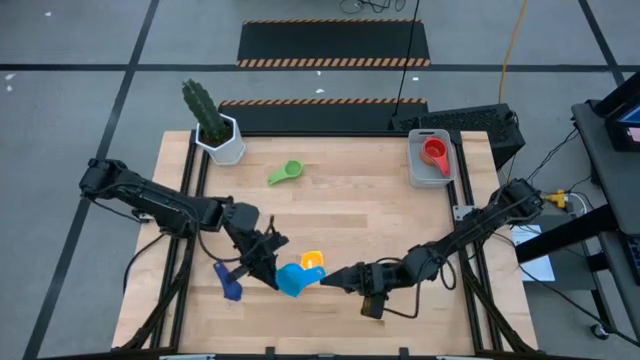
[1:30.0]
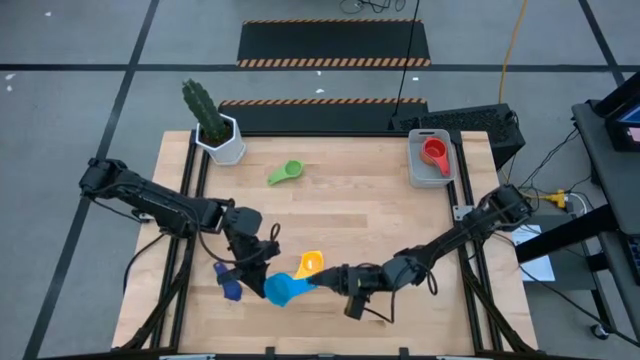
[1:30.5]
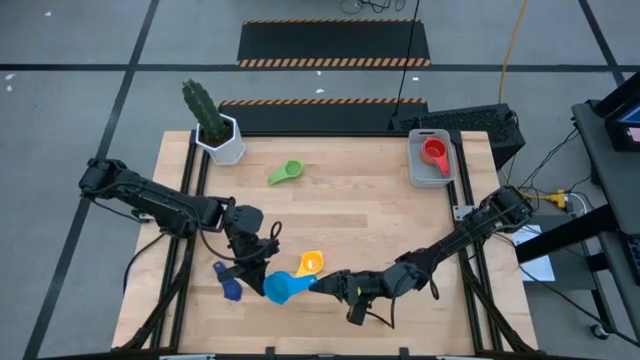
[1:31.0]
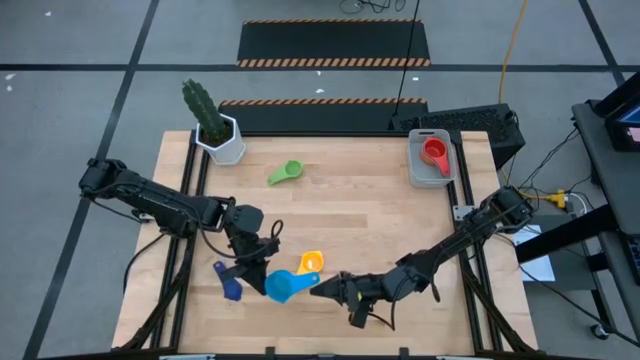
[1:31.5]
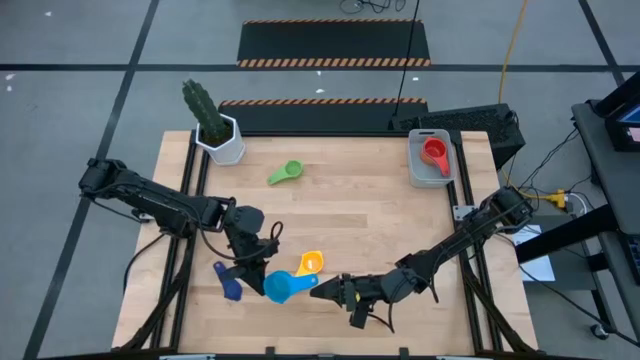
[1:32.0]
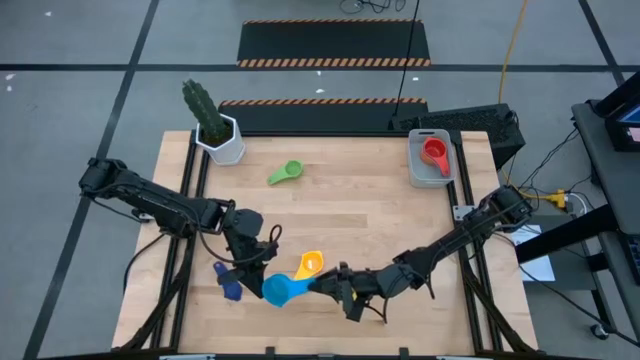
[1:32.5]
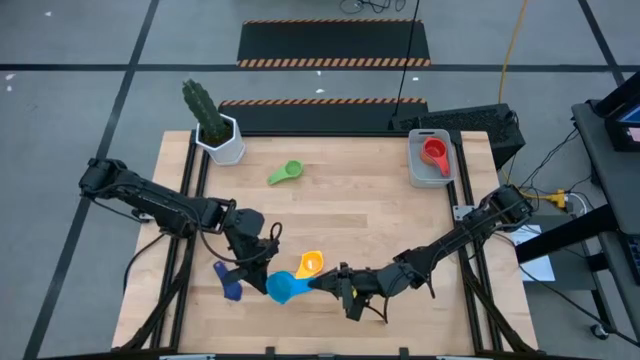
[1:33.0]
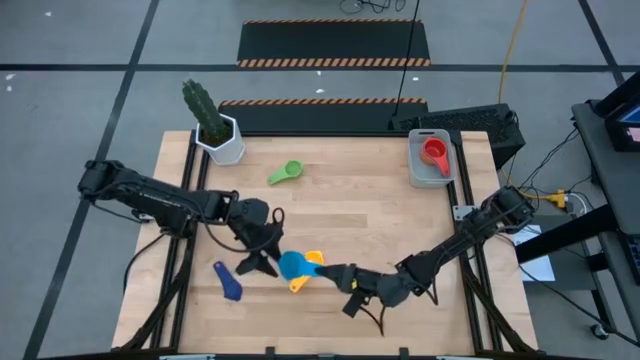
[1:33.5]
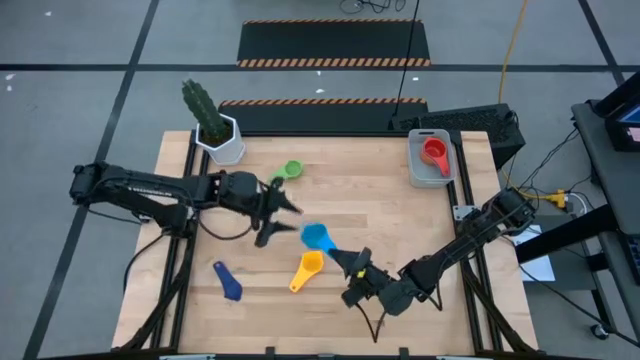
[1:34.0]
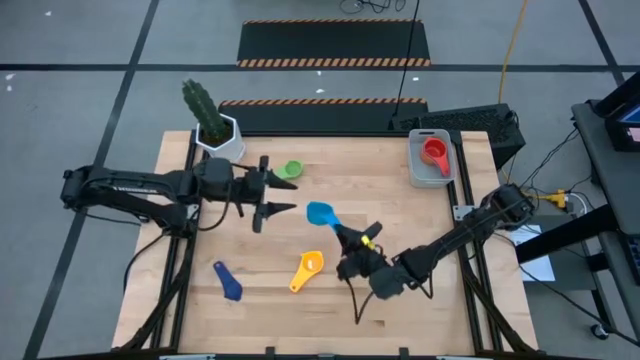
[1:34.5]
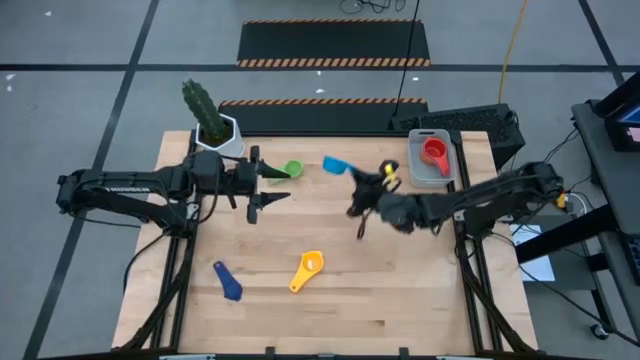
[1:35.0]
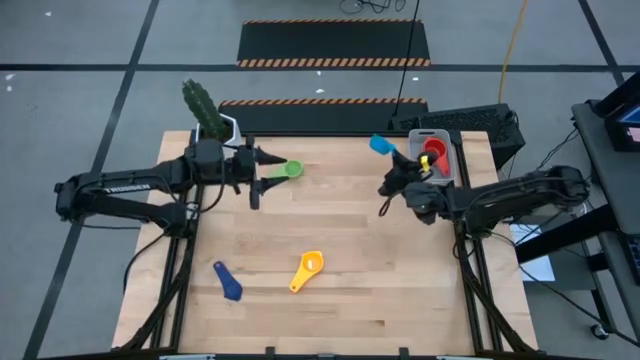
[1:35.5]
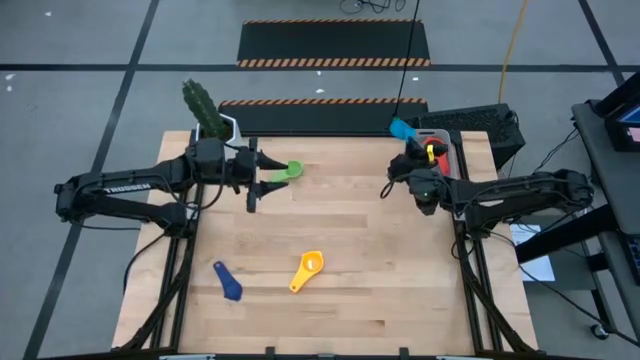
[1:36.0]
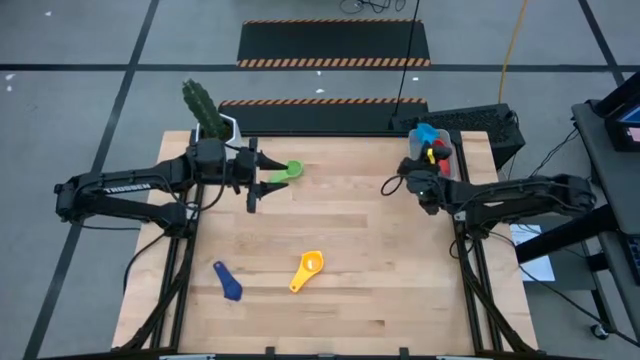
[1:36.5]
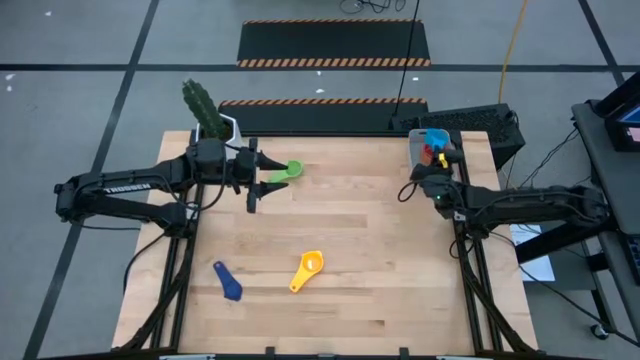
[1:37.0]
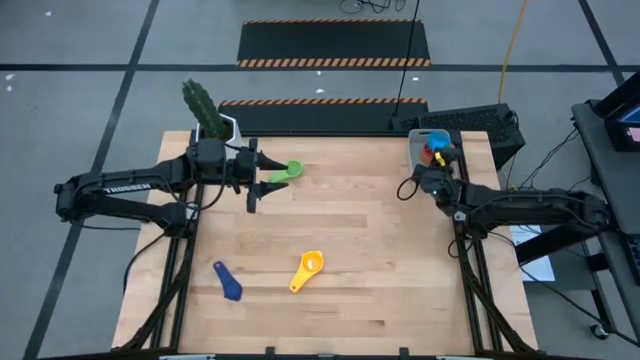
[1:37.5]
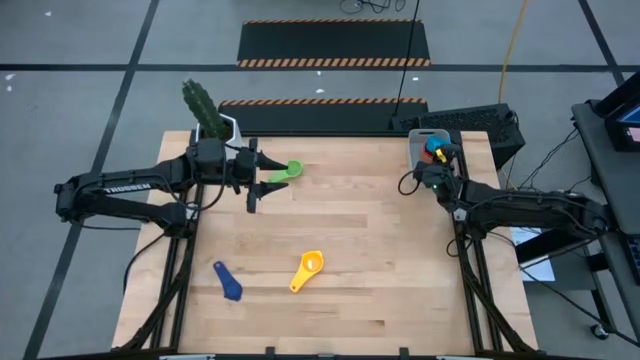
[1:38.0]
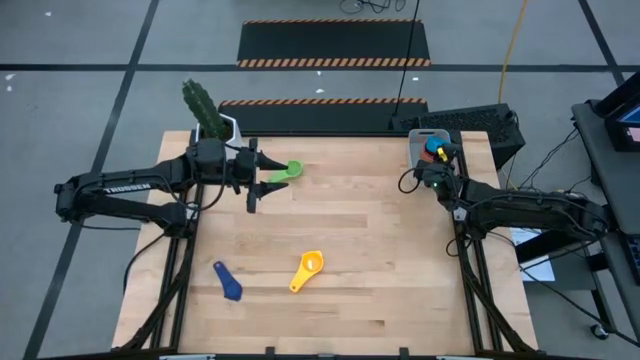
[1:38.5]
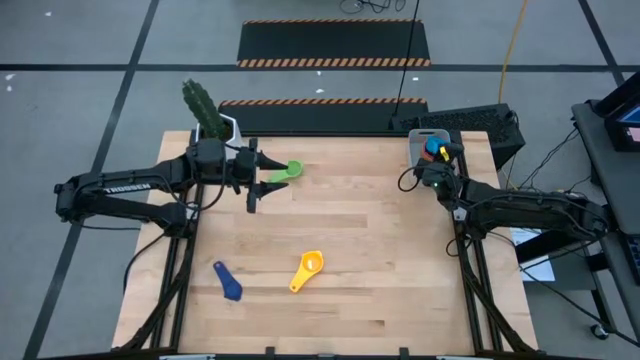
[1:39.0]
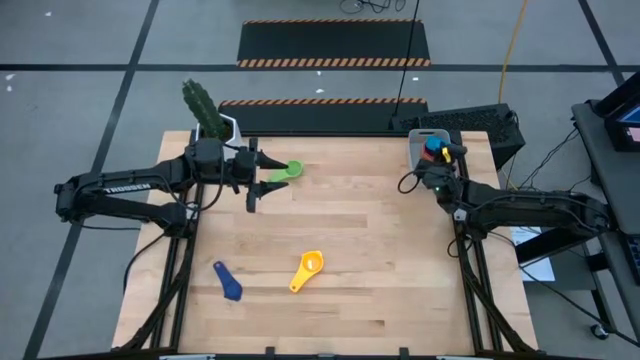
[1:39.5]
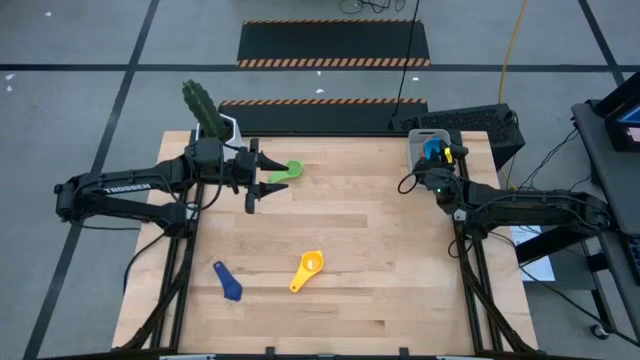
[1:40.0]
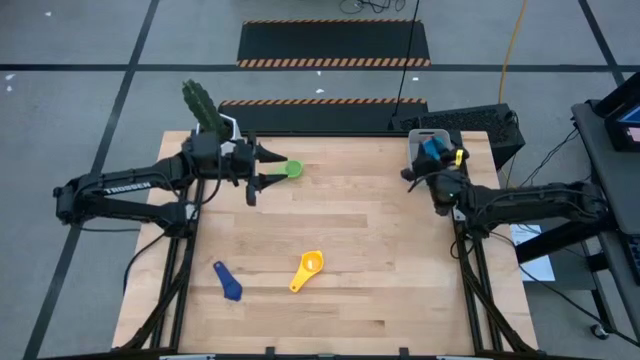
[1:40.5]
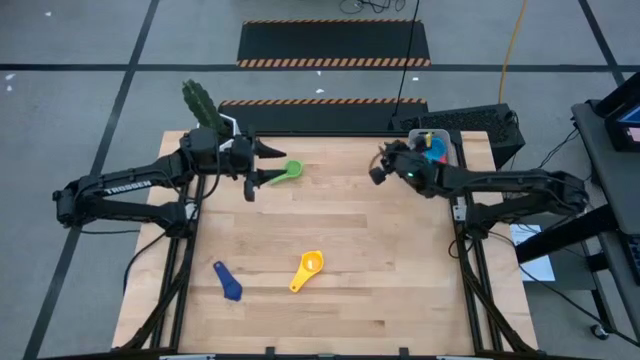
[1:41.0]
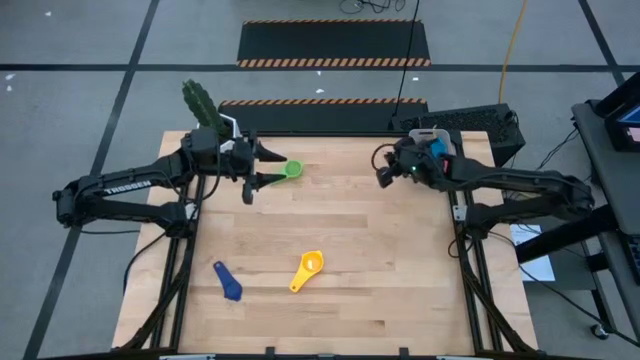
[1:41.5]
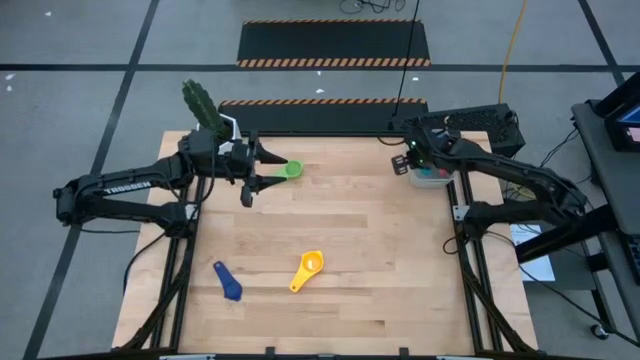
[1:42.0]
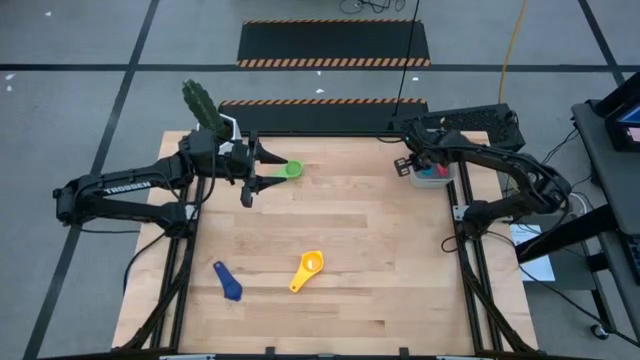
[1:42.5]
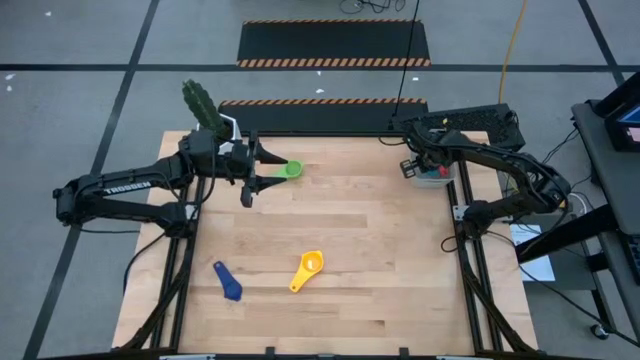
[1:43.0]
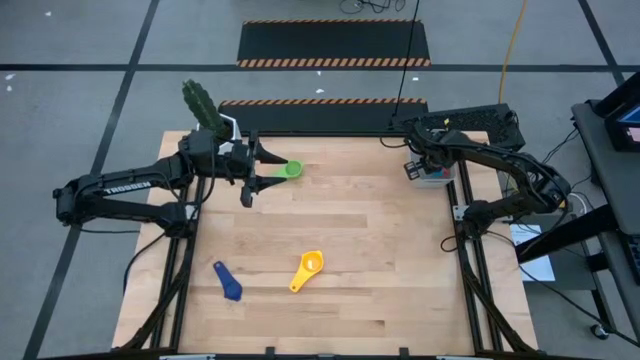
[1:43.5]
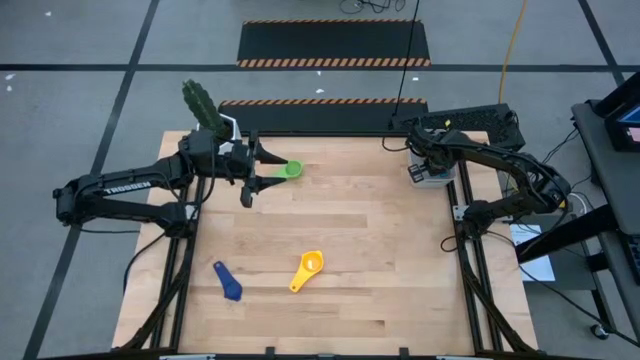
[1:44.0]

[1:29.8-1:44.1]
Task: Nest measuring cups in basket
Stack the light blue measuring cup on top of the orange measuring cup in the gray bin

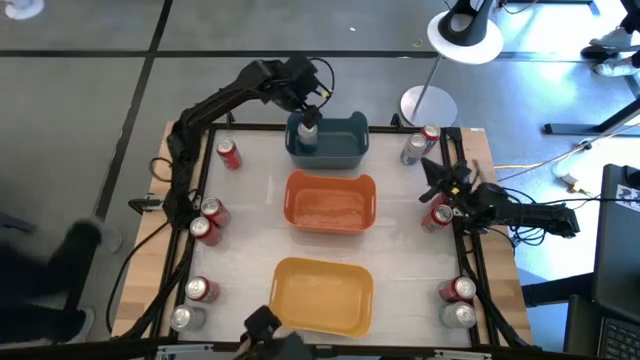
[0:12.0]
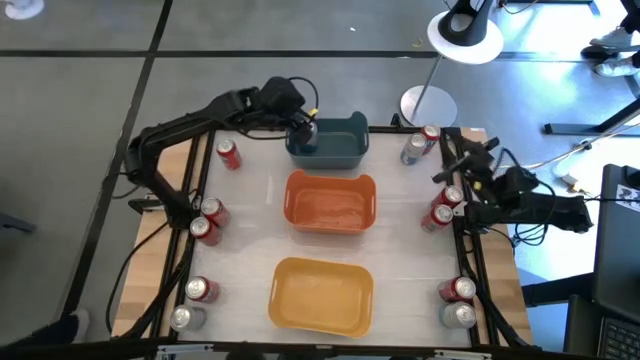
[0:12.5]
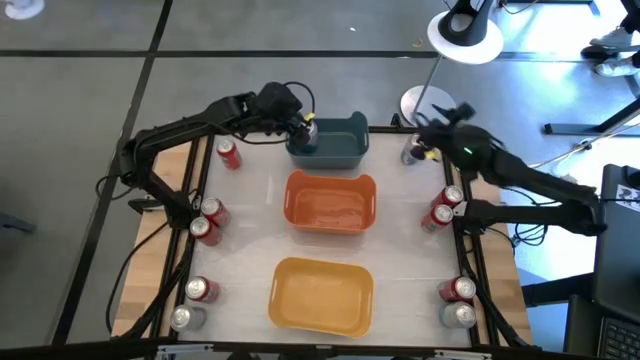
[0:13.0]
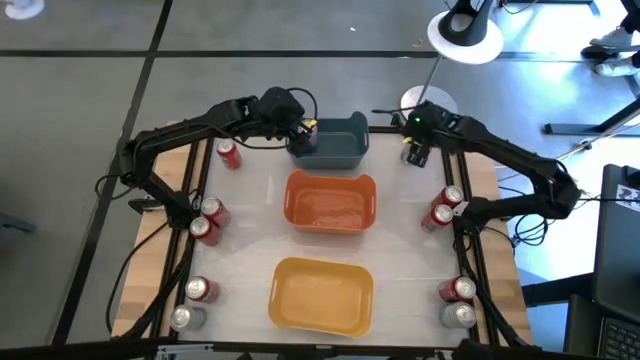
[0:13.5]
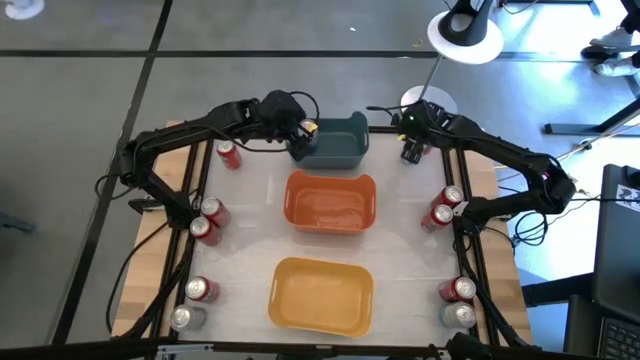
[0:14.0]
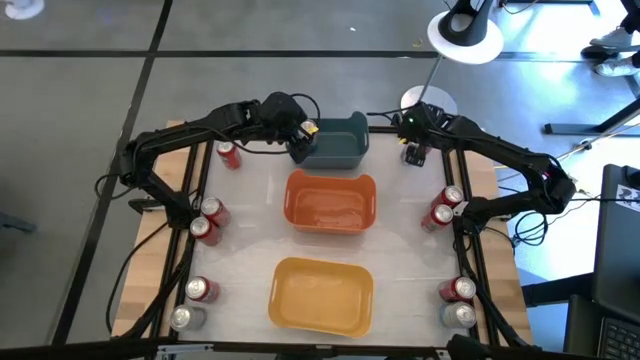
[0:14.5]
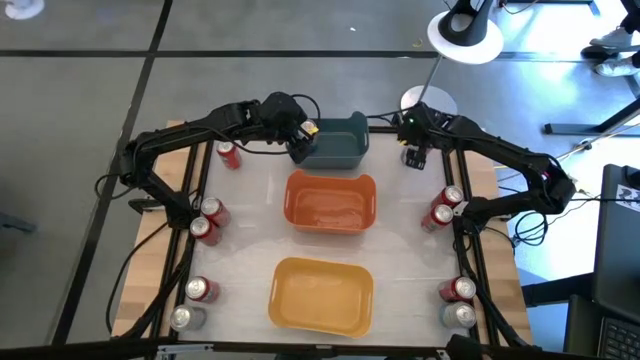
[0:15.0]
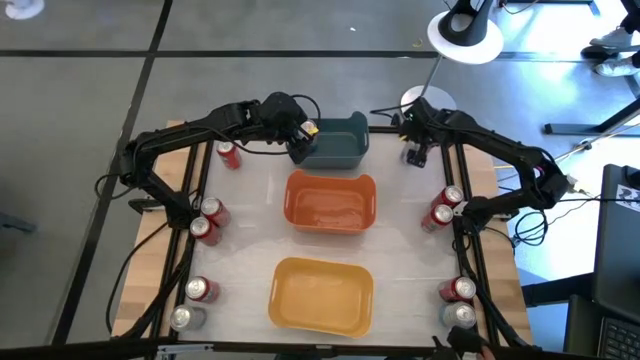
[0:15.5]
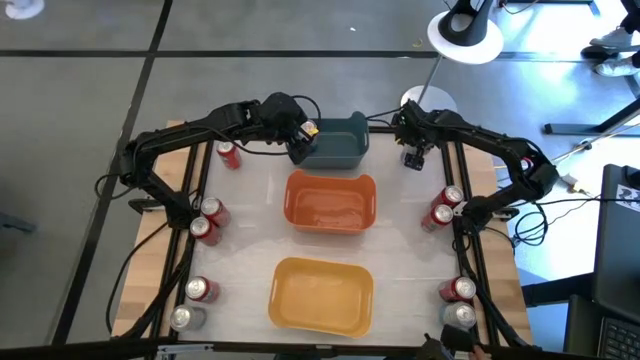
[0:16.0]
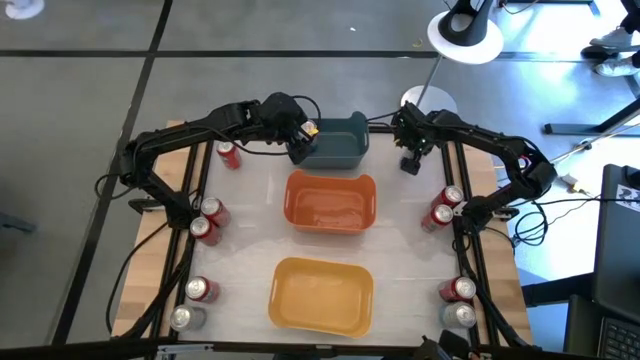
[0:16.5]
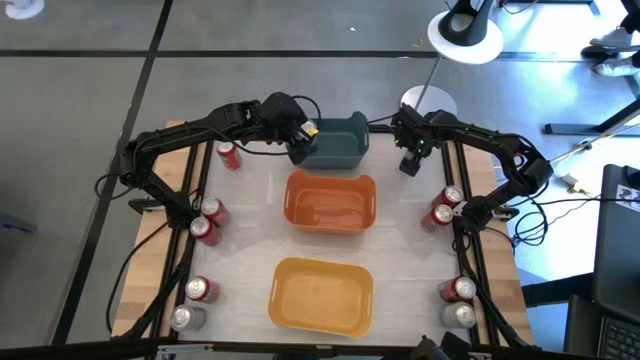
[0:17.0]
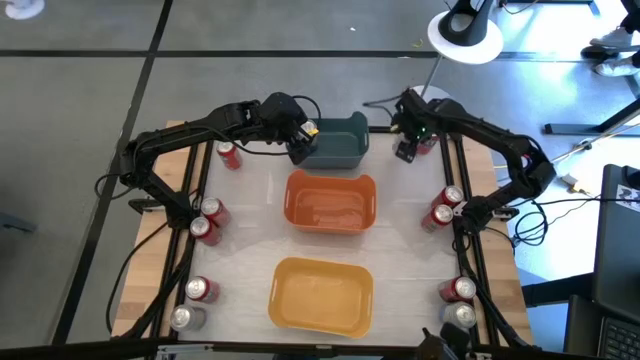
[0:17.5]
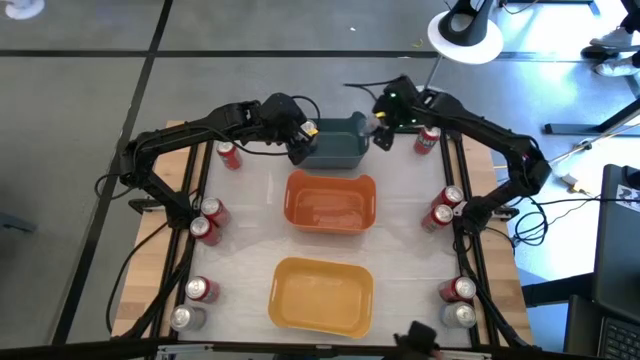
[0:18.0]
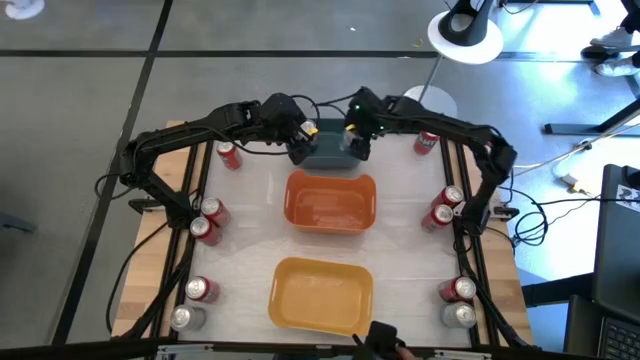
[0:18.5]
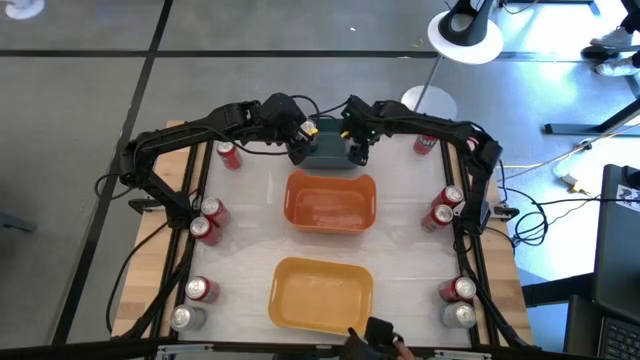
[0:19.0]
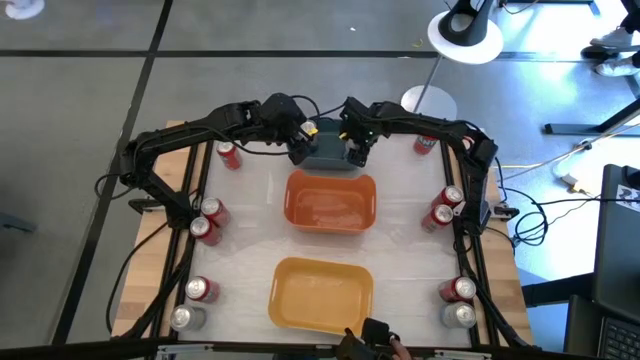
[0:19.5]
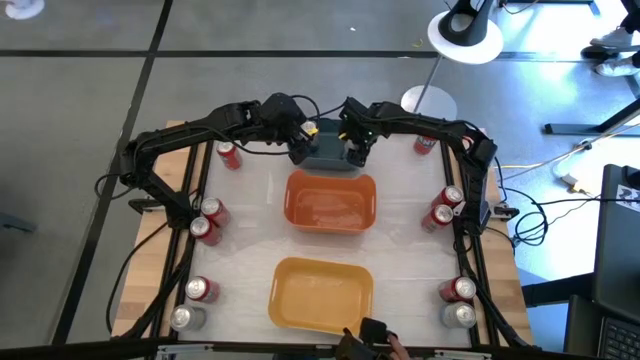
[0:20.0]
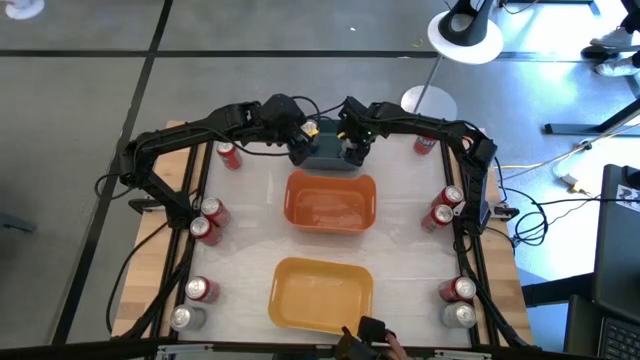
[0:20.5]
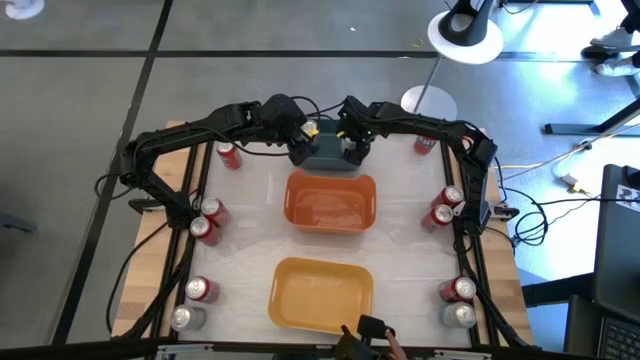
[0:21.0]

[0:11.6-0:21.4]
Task: Sort soda cans
Put the top blue soda can into the dark blue bin
